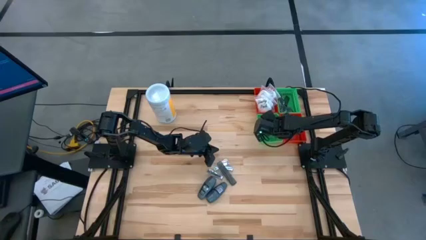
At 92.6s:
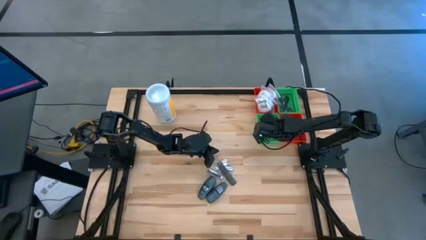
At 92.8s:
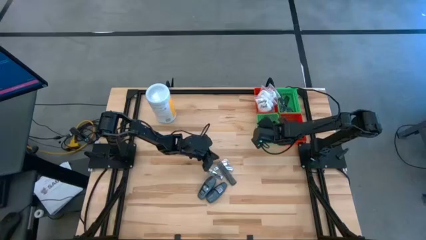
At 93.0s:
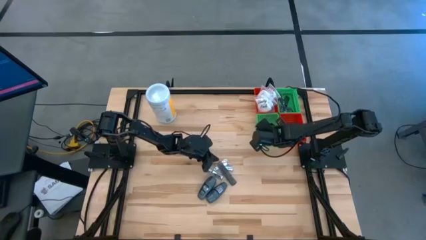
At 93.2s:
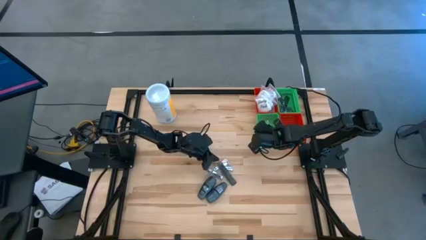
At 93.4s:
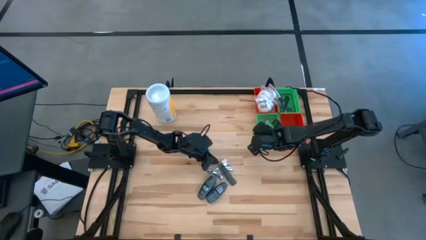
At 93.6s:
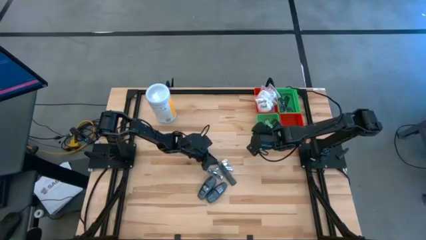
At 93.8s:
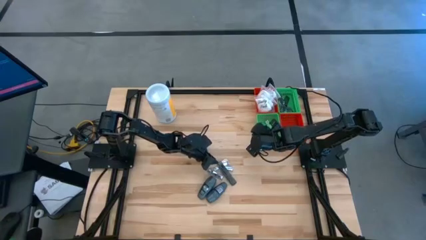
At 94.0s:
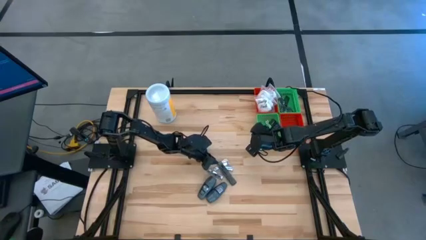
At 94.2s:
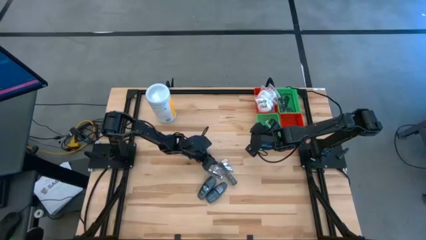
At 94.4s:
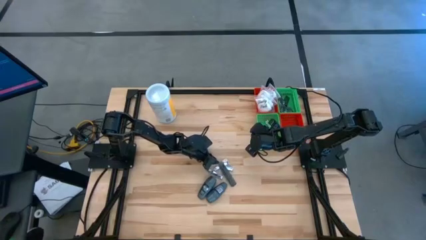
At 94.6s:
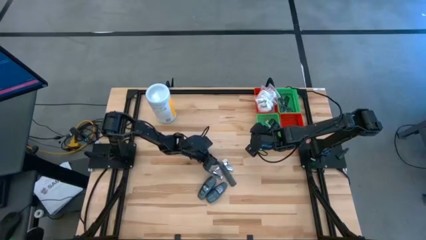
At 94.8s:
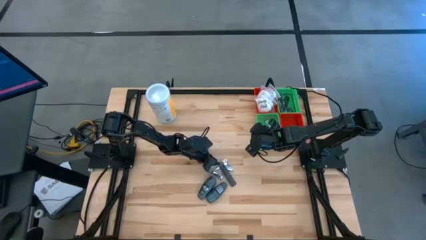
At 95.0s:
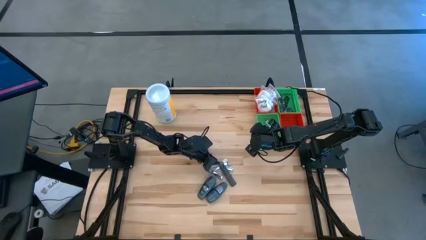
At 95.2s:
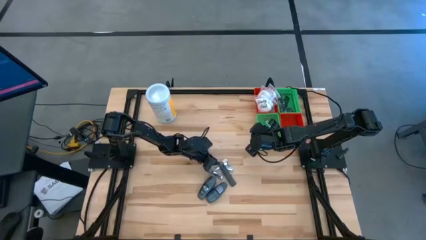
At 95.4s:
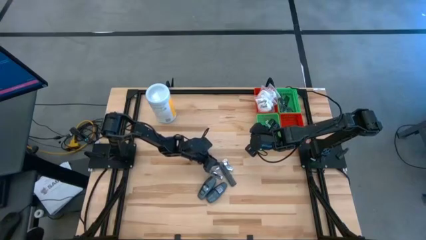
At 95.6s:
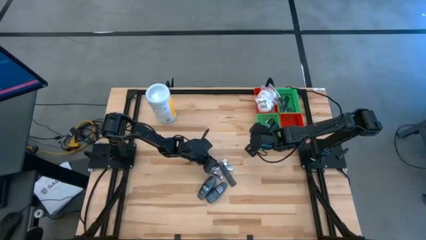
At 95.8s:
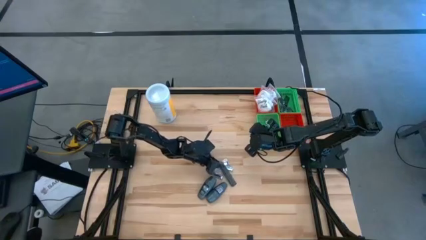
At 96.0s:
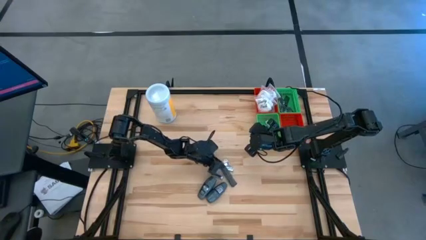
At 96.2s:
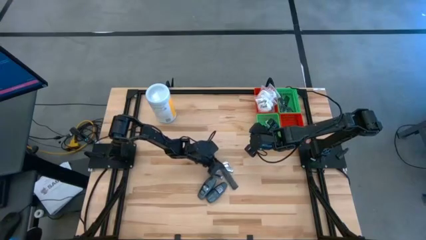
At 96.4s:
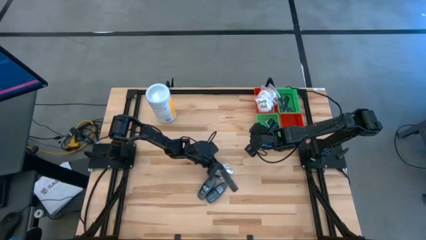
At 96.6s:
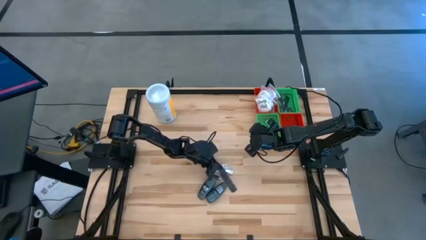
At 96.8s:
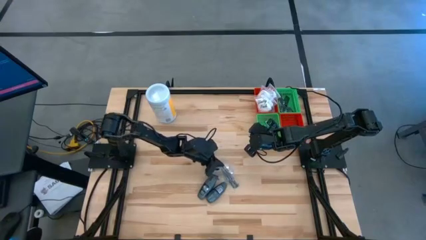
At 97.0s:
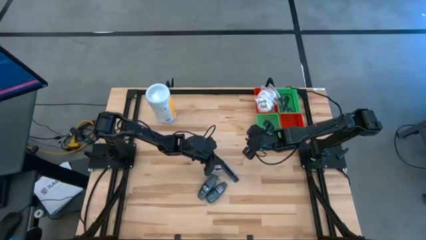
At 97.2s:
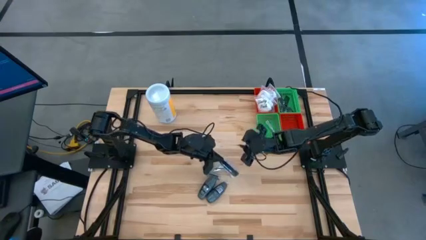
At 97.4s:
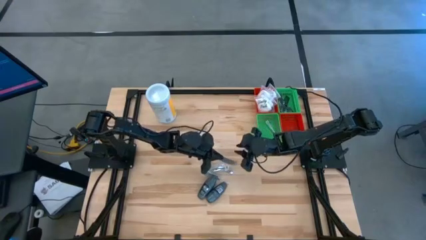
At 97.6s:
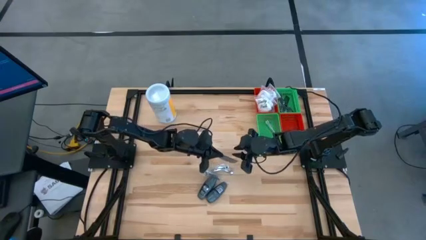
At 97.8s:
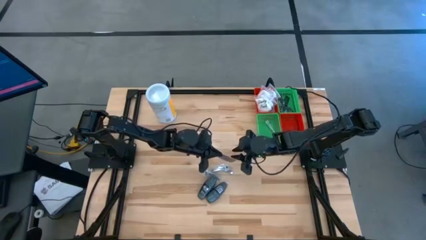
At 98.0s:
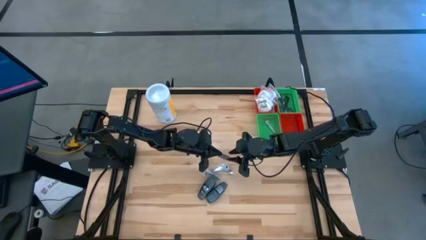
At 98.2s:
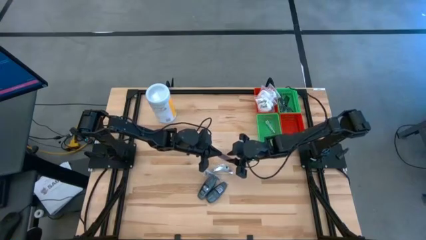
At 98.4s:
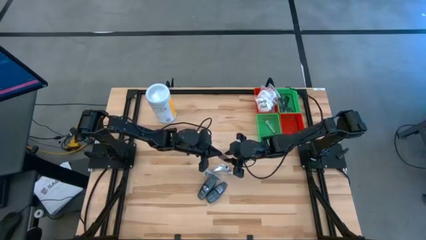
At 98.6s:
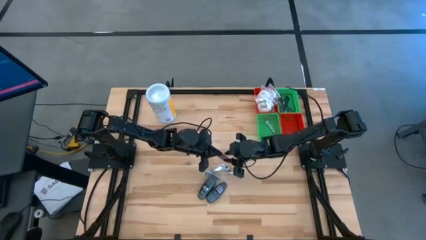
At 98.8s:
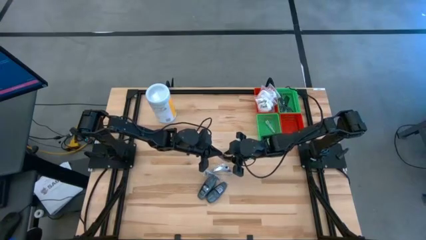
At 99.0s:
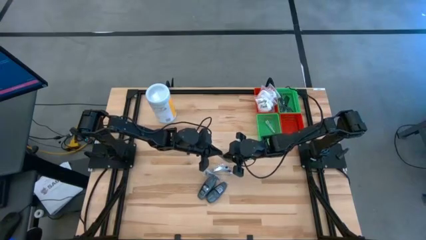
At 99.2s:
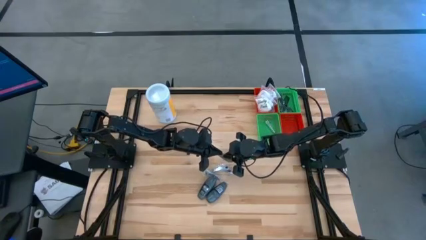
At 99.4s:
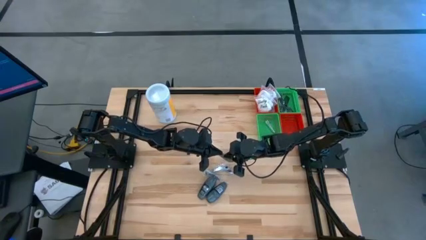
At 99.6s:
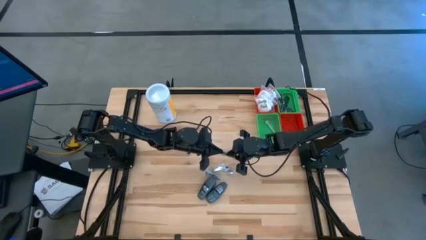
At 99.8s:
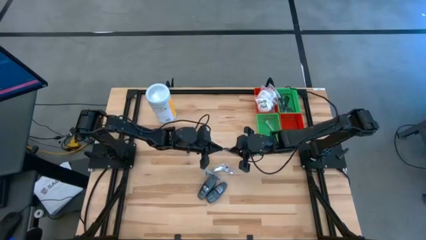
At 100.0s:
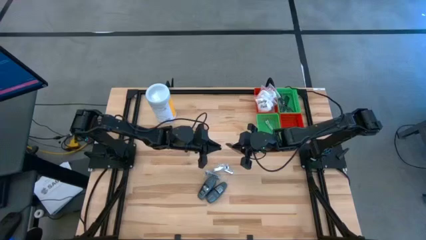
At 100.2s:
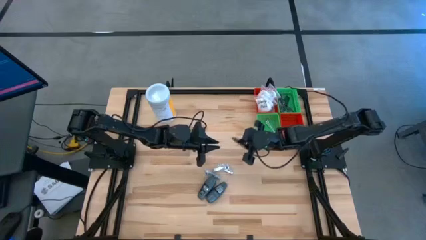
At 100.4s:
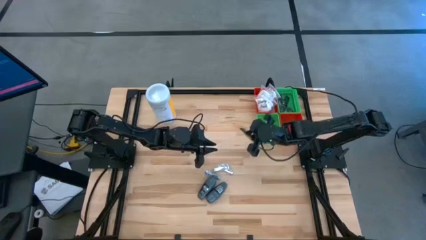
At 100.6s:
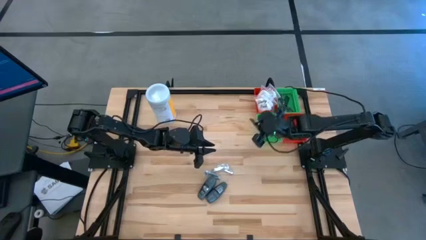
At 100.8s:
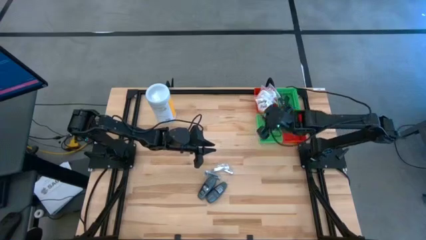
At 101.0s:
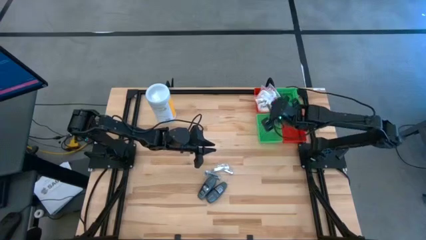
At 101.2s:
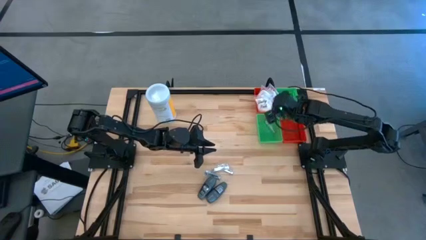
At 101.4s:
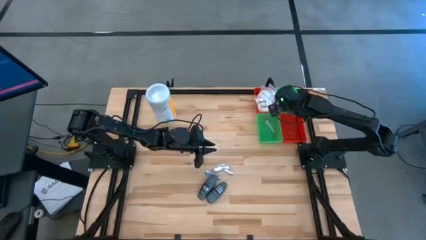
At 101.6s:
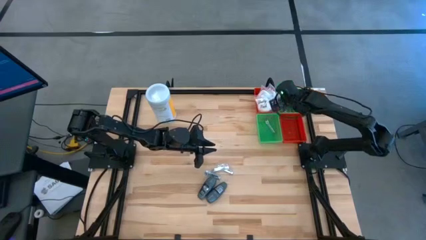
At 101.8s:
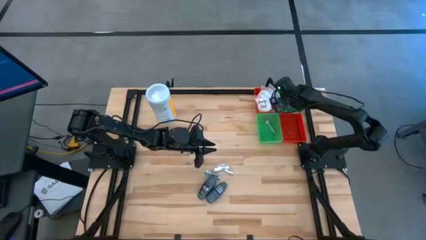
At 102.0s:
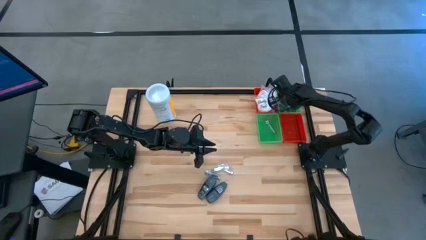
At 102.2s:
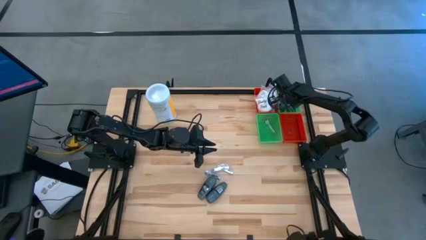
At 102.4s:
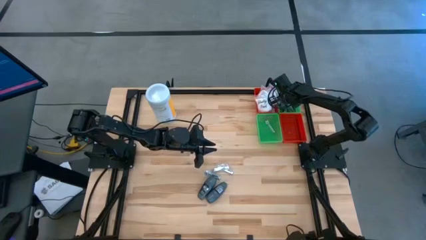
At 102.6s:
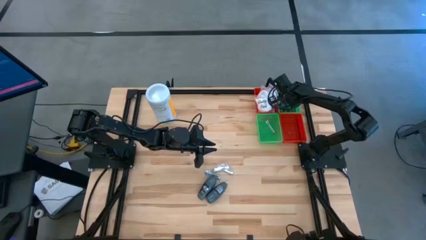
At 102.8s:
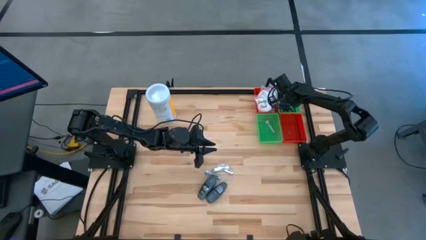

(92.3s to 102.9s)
Task: Pick & Place Travel size toiletries
Put the black comb into the top green bin

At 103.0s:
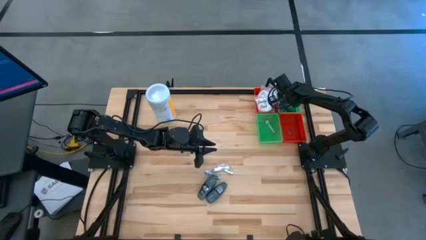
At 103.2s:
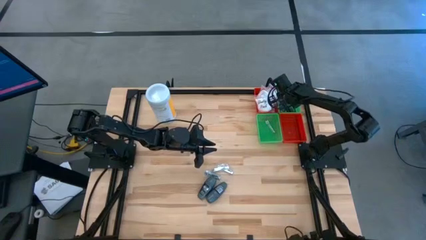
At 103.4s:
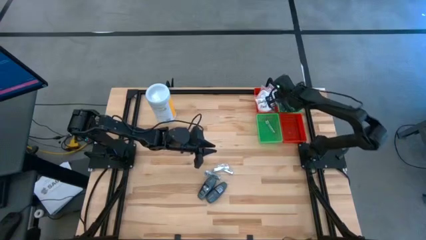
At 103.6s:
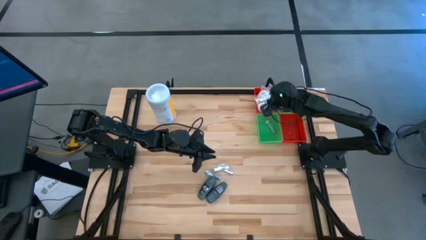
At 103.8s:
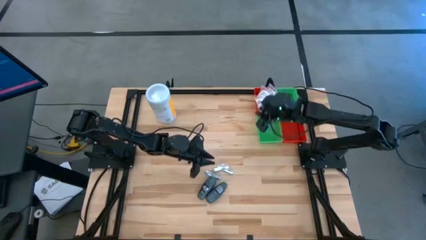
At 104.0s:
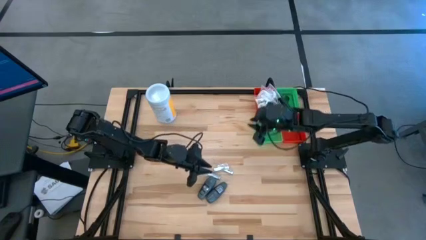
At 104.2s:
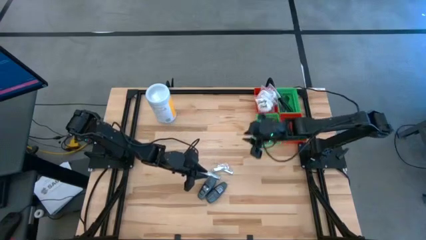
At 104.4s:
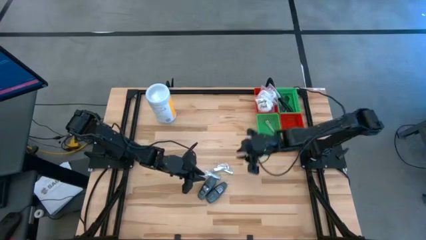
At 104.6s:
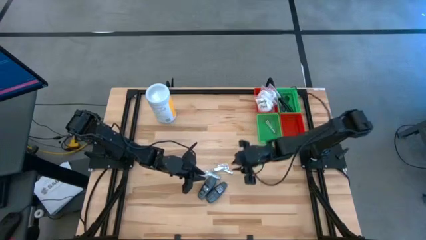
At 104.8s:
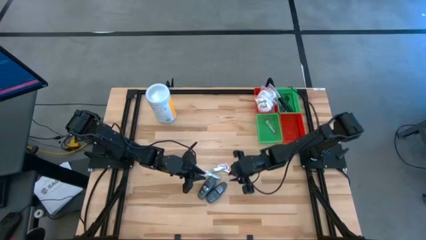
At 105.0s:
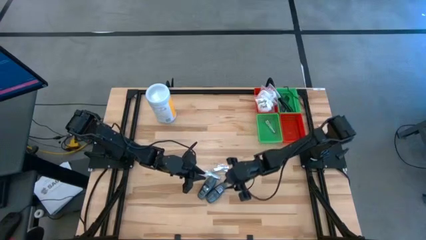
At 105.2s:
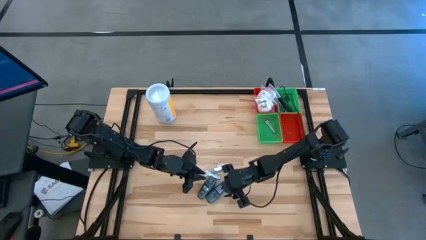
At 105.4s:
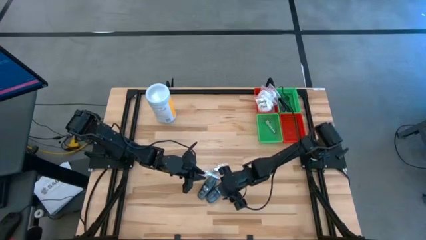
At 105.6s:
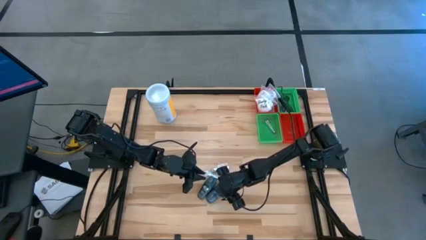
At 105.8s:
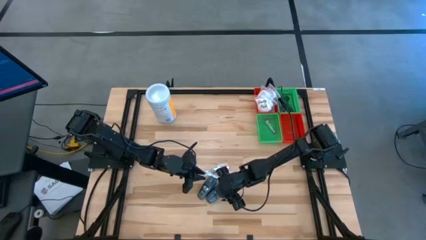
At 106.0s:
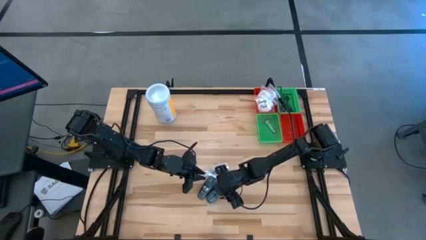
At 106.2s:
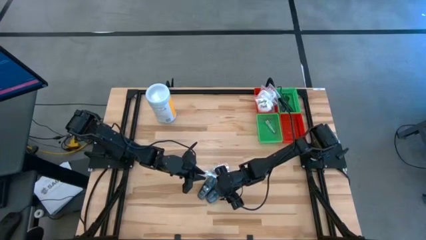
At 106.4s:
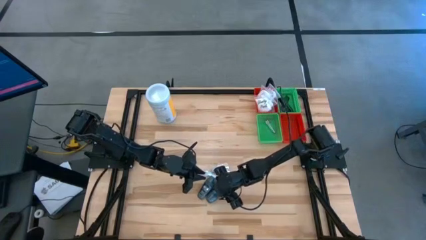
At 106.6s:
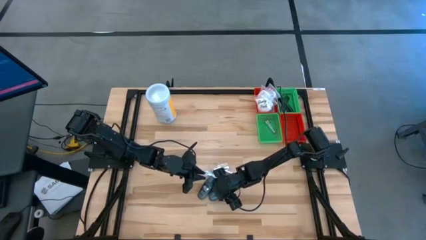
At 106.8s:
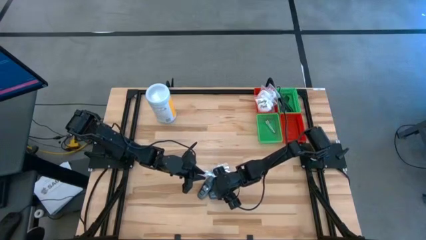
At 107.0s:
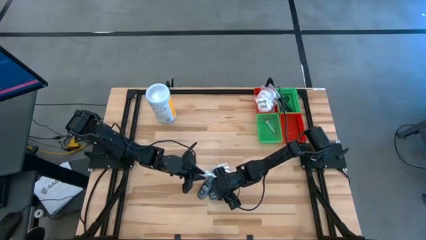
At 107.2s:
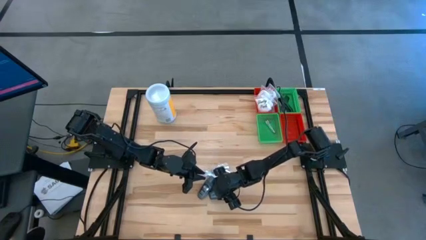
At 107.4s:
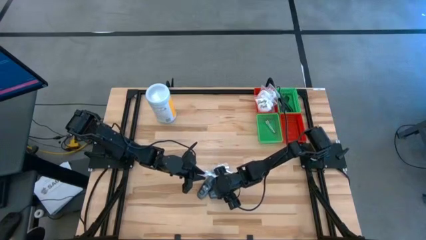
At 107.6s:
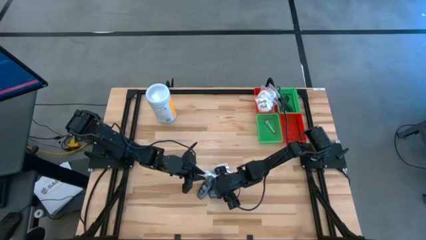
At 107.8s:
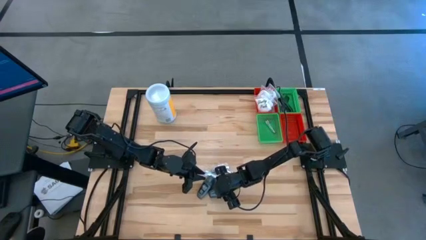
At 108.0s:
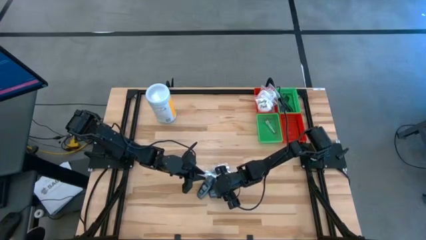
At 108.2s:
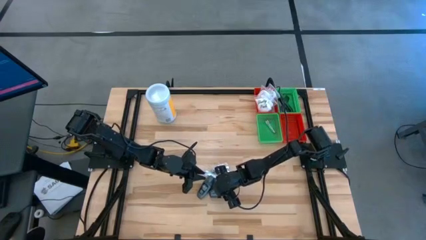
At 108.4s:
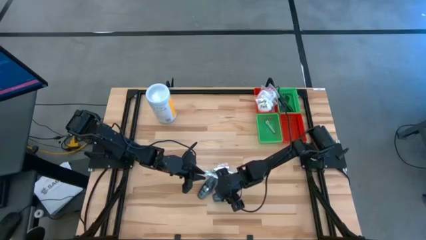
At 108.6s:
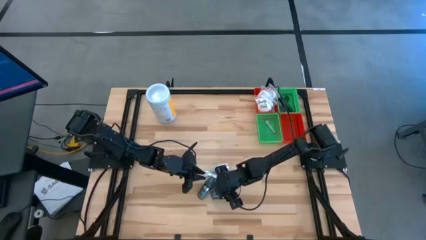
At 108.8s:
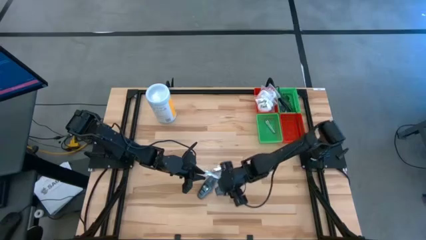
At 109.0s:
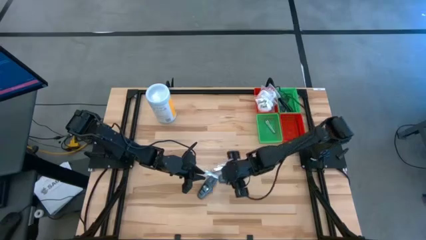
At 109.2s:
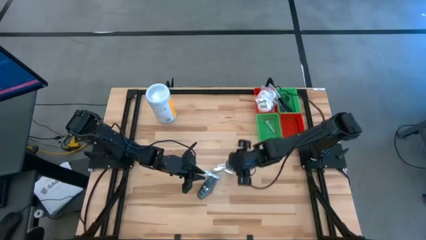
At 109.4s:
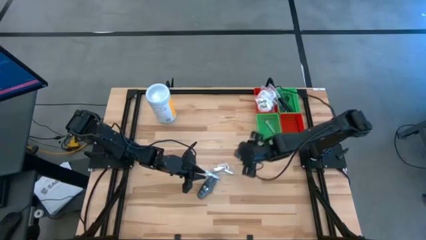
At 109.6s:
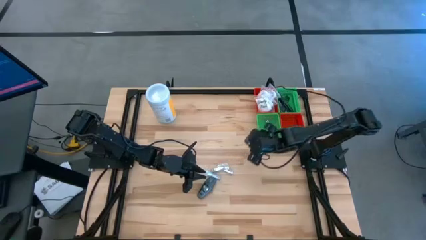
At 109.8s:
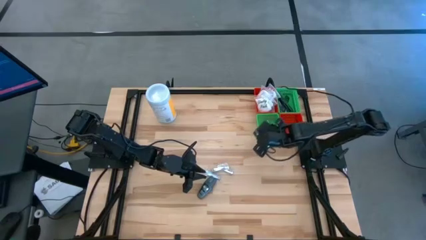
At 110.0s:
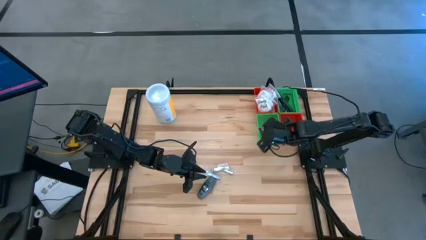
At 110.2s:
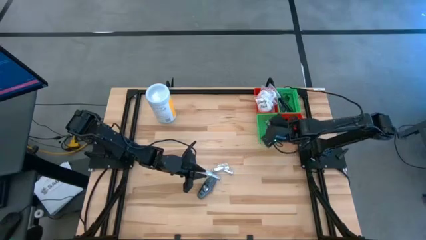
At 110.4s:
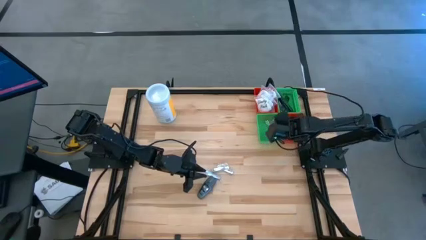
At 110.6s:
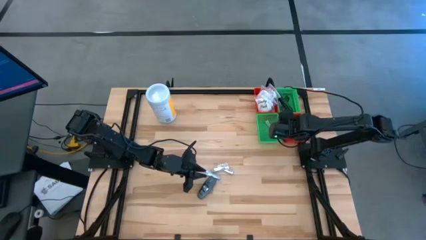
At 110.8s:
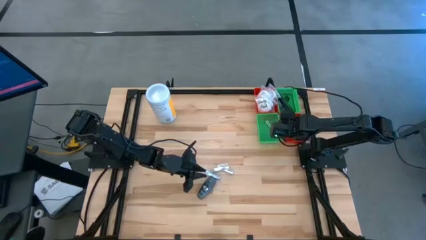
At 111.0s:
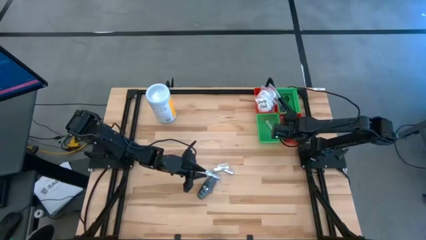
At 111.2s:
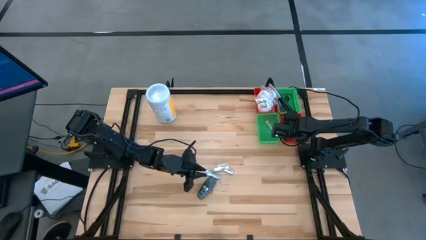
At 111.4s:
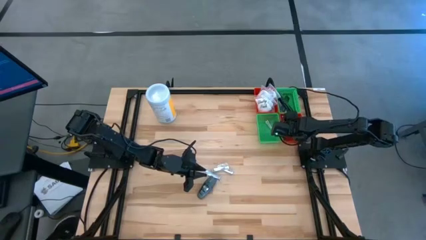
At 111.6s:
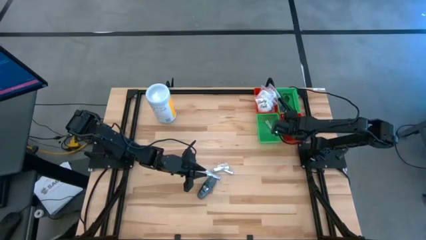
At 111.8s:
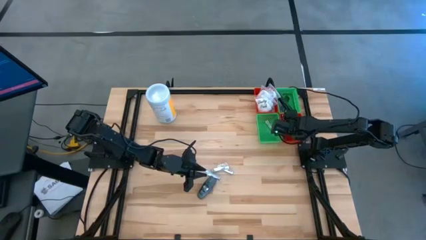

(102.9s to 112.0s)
Put the right gray deodorant into the bottom red bin
